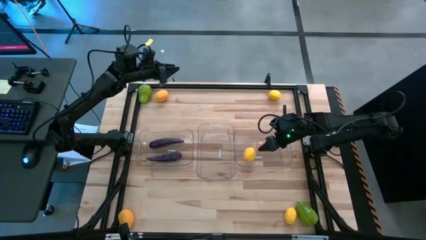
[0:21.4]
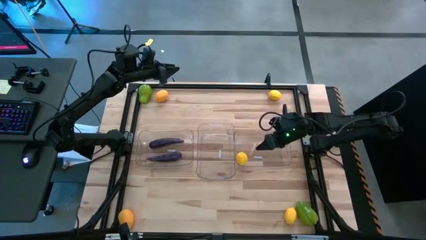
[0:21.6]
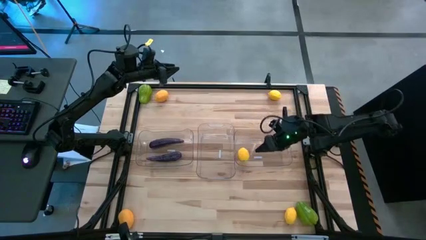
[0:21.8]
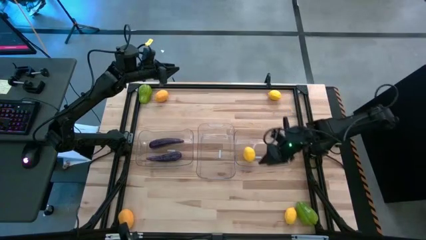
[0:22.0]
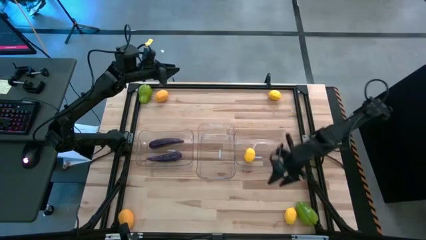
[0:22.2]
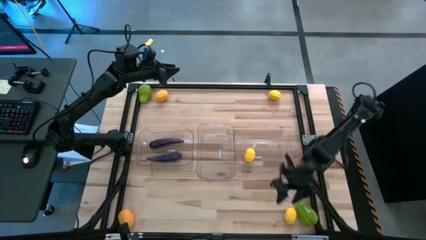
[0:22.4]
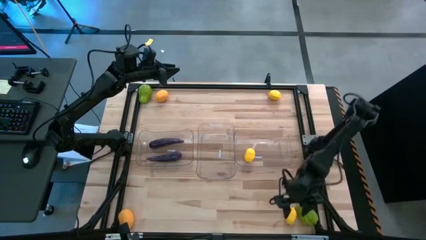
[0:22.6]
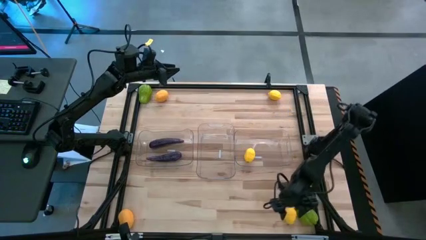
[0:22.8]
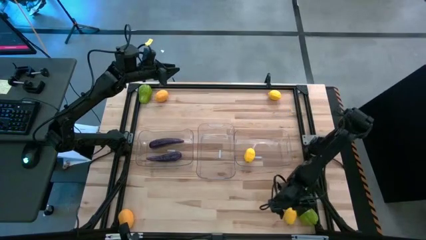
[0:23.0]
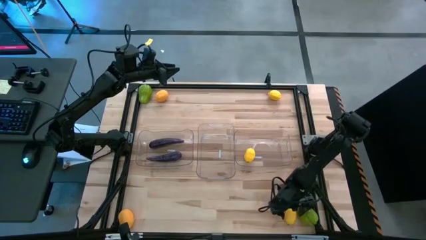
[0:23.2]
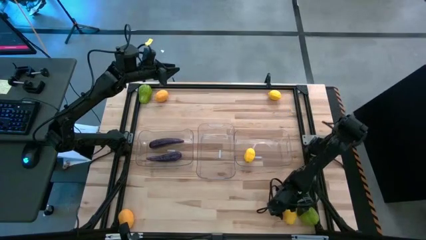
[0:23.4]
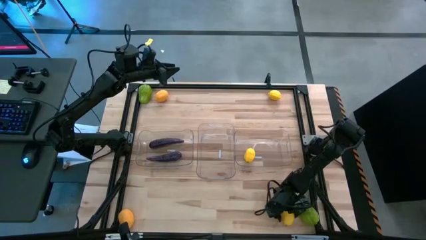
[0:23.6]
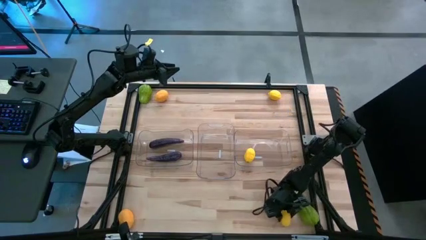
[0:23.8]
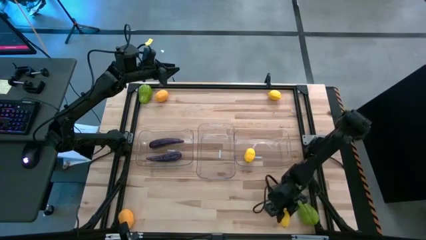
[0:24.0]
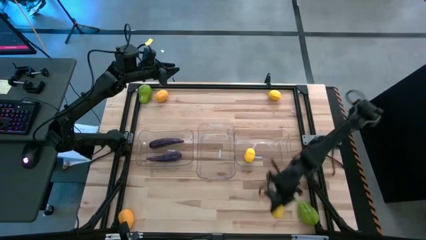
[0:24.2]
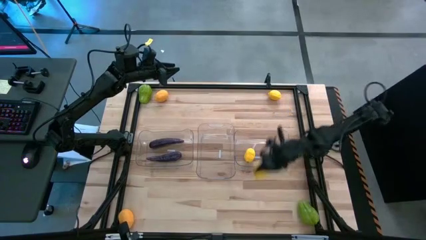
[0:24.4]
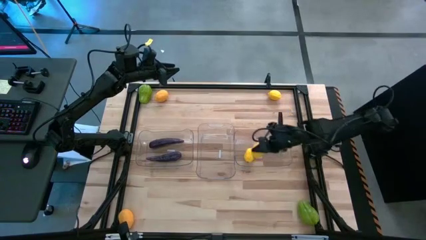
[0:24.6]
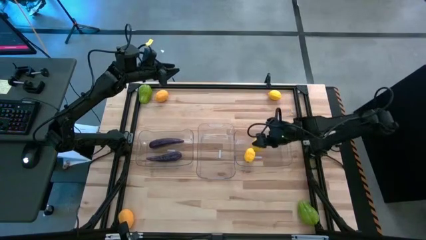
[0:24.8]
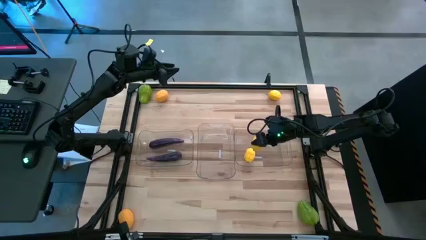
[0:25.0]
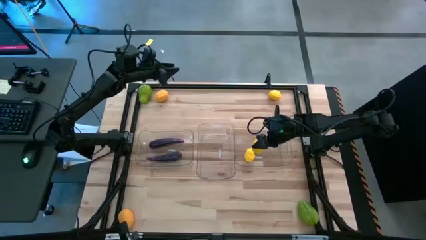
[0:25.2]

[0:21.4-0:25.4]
Task: Sort produce into baskets
Put the lemon into the right transparent bin

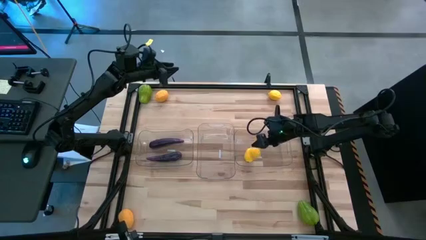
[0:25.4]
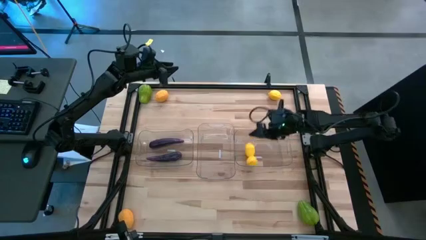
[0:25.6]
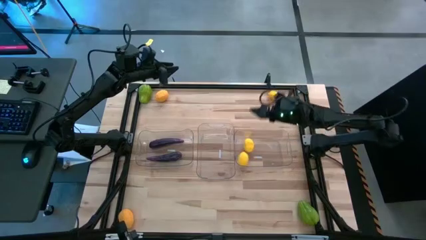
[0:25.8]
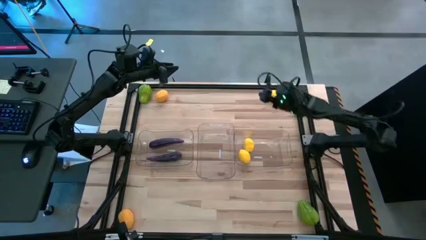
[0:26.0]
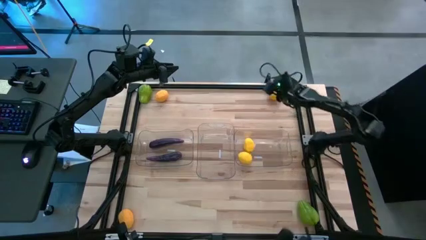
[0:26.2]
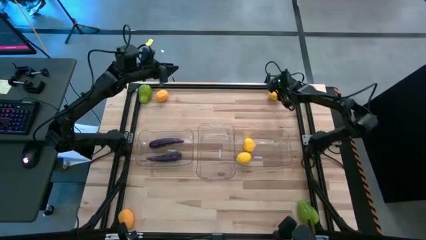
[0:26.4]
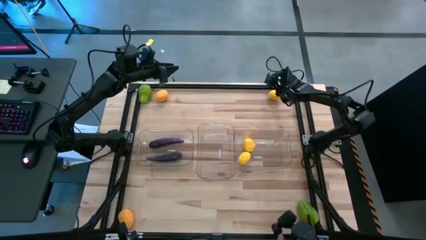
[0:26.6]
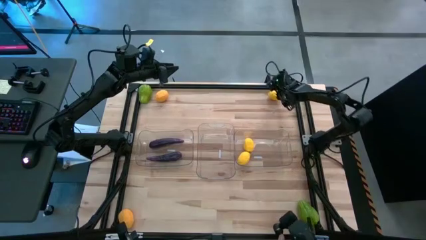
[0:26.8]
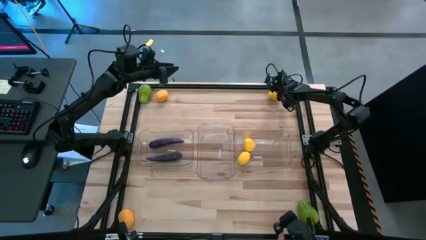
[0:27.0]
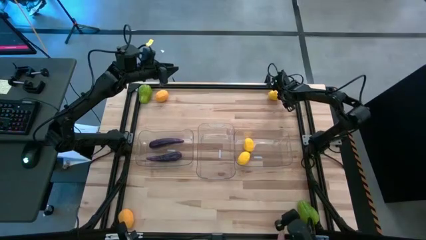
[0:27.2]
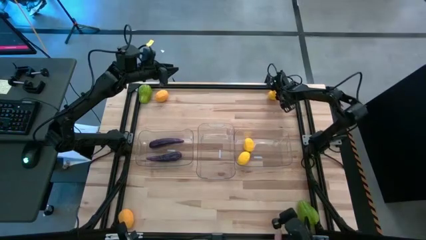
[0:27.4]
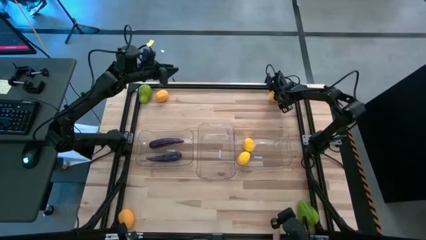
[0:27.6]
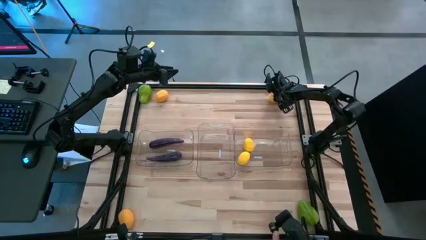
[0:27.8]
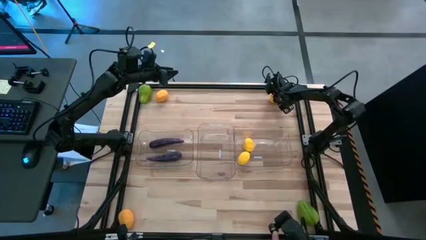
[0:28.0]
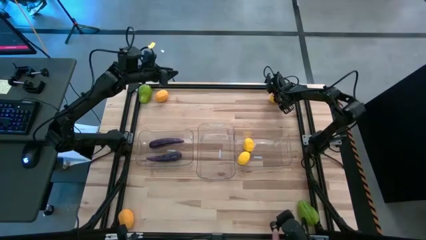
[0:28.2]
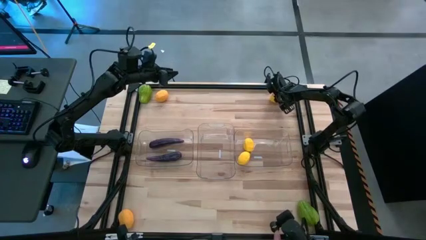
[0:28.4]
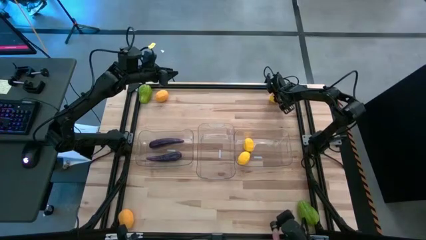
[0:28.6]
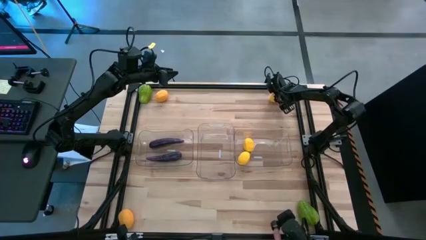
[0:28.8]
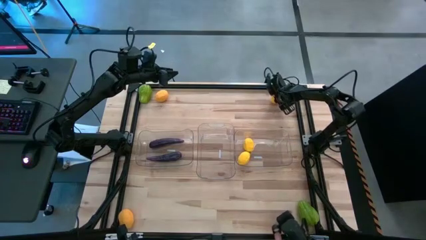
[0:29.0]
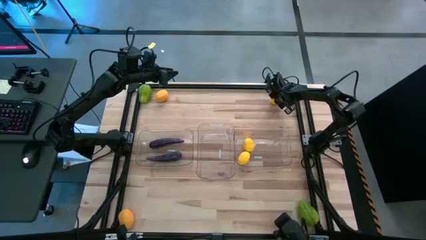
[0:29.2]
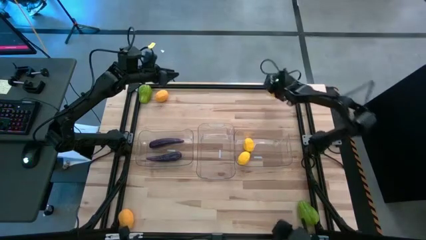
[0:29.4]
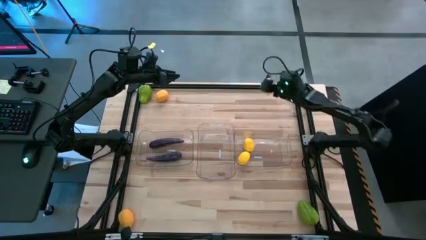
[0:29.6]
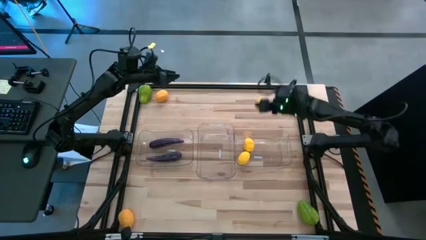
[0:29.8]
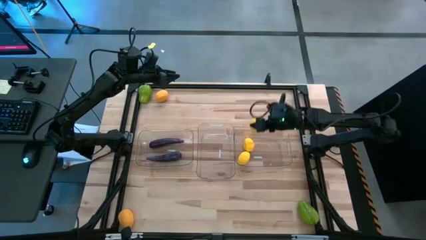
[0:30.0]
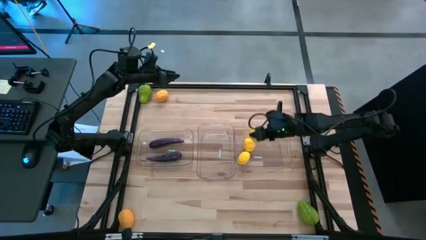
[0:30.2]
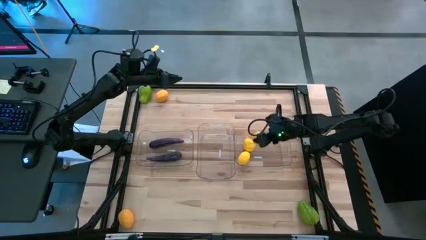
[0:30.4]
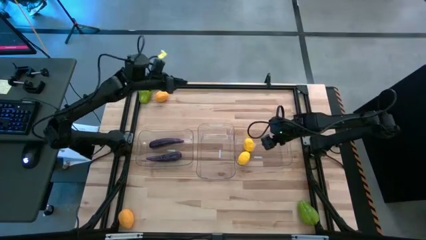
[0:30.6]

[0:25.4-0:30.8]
Put the lemon into the right transparent bin

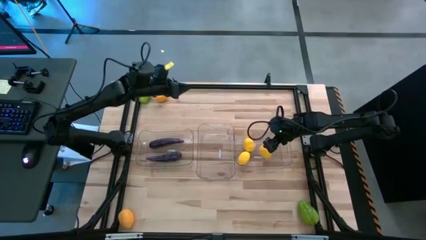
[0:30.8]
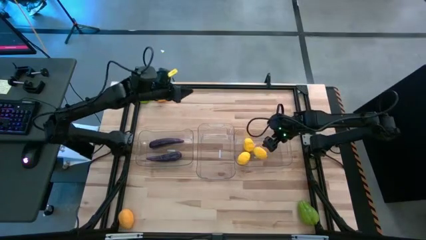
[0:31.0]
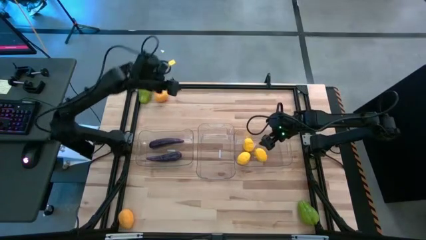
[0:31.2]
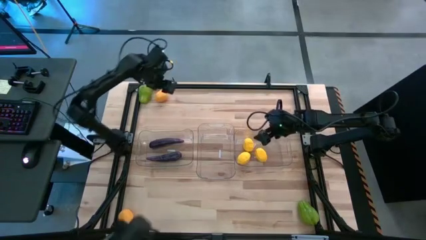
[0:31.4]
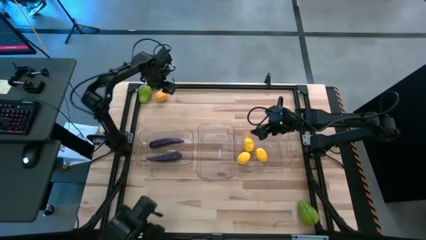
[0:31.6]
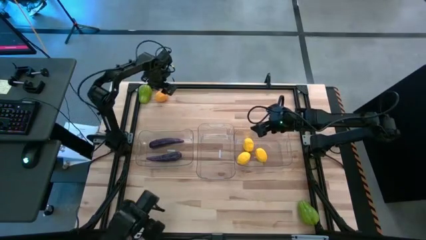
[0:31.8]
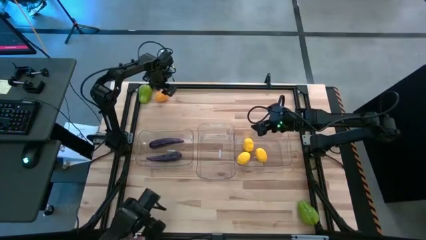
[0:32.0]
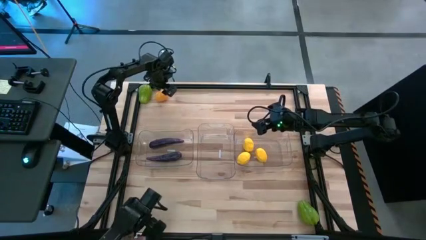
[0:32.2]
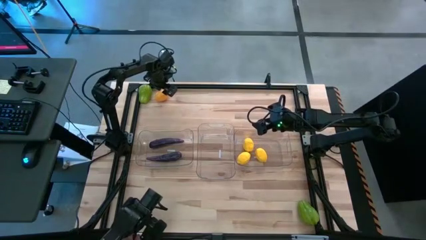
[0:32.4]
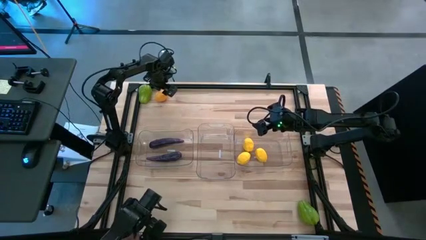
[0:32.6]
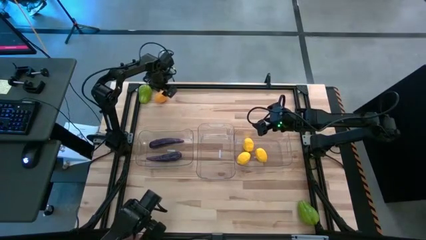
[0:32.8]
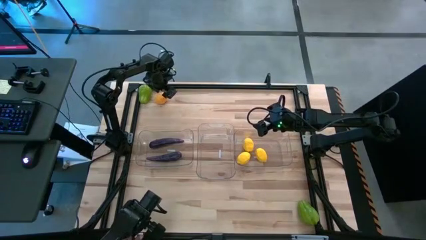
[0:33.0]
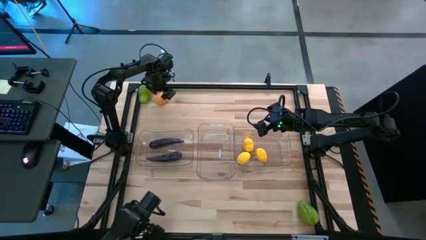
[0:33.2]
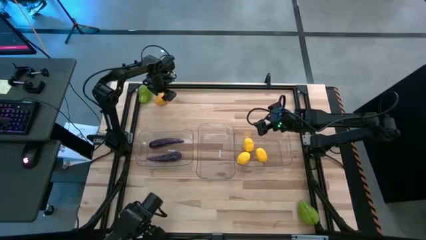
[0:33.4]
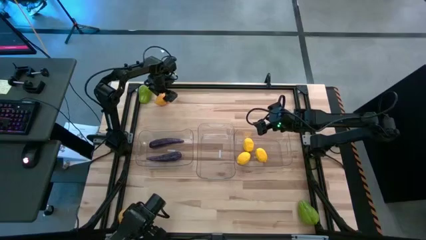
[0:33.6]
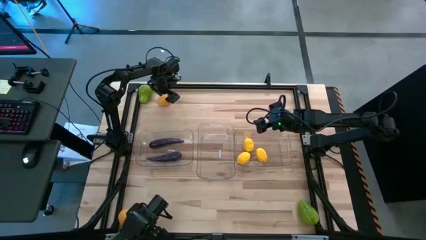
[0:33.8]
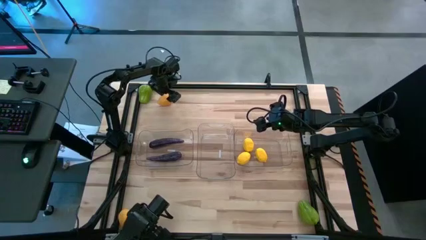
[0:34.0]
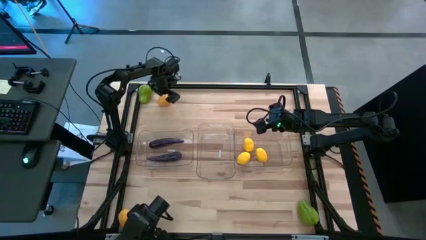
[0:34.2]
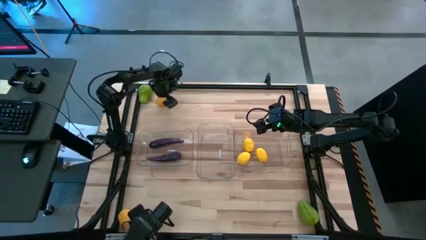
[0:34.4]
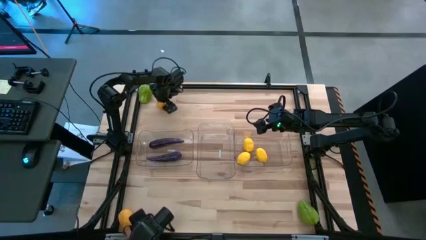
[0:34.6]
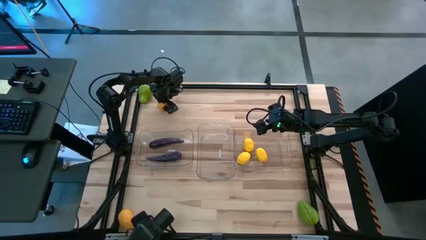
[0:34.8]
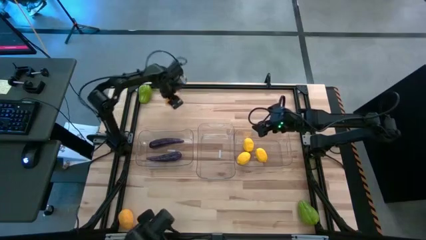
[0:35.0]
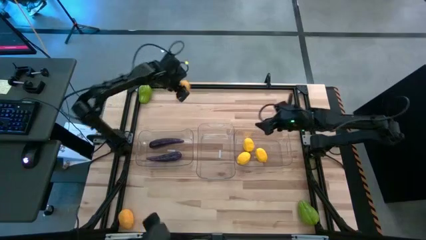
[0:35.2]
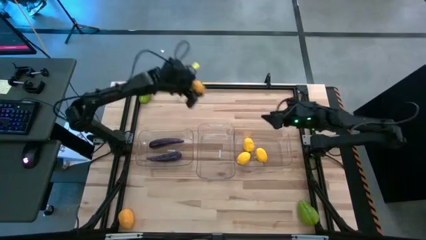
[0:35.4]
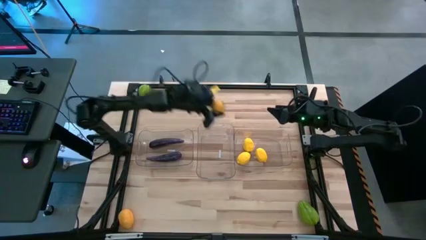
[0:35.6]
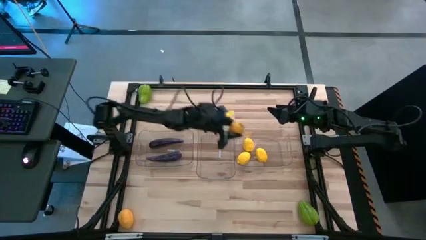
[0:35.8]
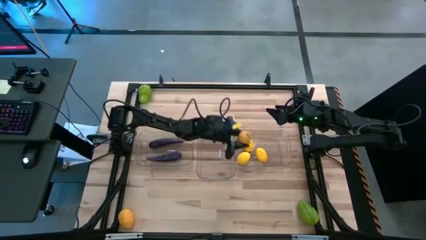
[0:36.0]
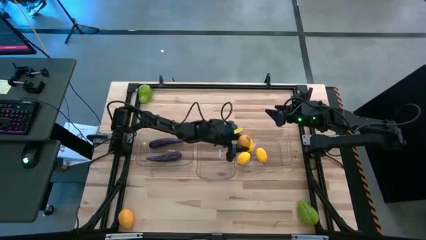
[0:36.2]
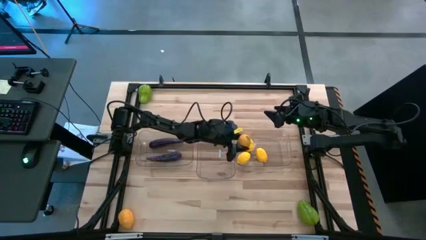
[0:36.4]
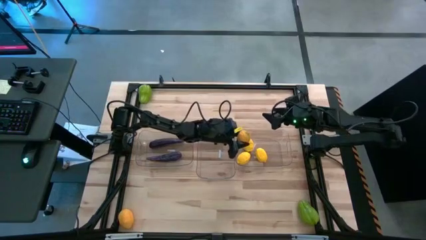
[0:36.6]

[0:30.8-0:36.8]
Put the lemon into the right transparent bin

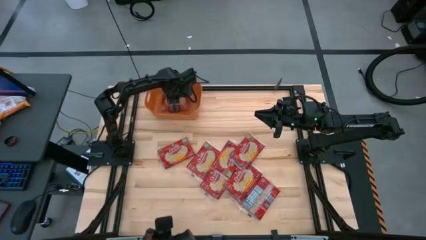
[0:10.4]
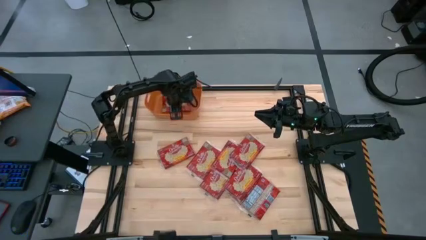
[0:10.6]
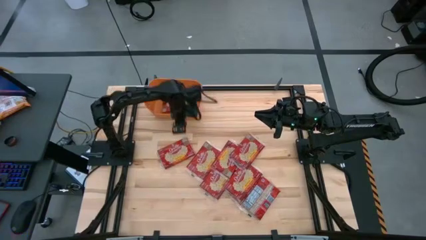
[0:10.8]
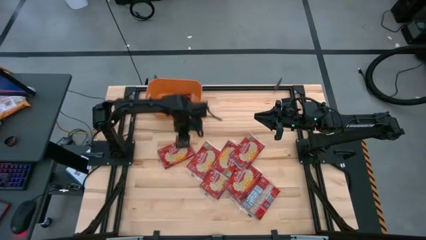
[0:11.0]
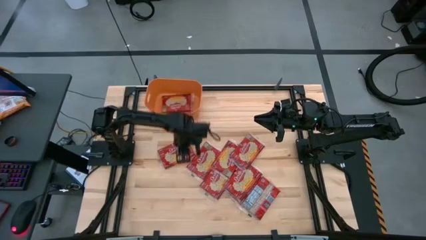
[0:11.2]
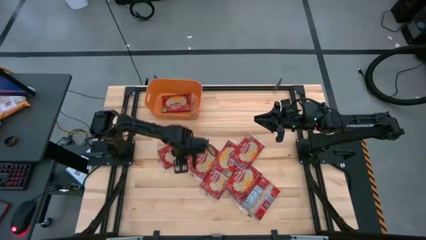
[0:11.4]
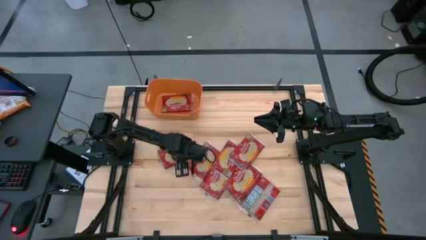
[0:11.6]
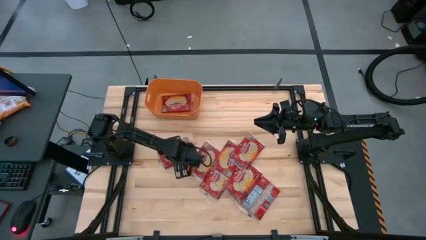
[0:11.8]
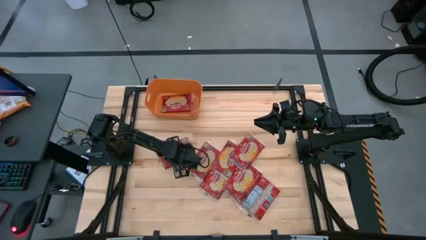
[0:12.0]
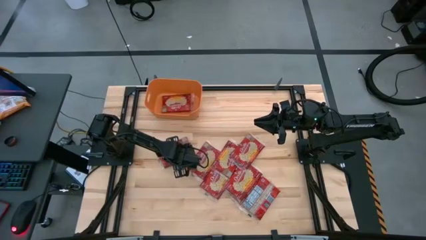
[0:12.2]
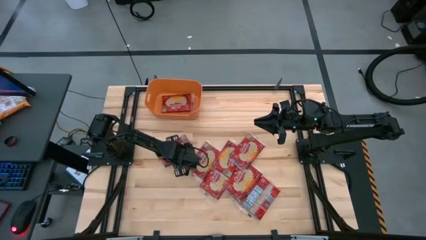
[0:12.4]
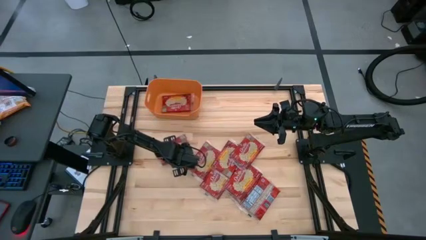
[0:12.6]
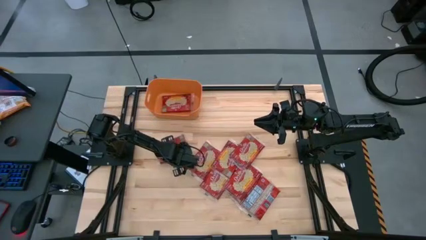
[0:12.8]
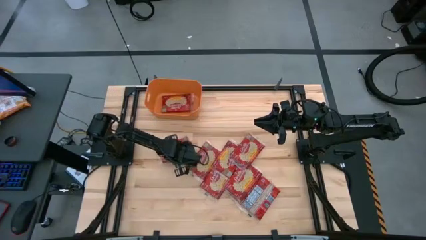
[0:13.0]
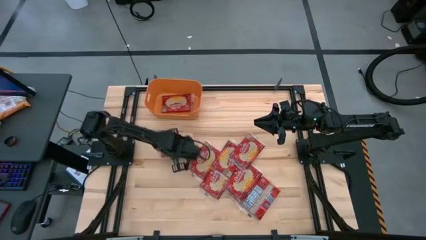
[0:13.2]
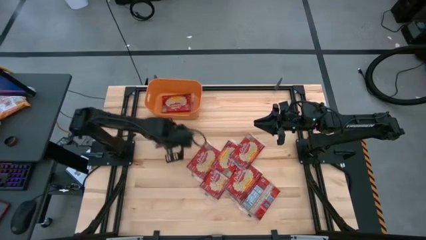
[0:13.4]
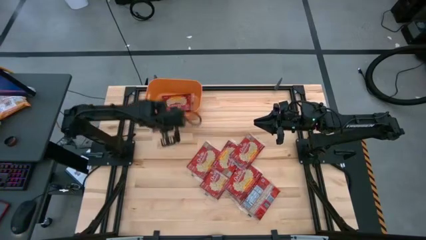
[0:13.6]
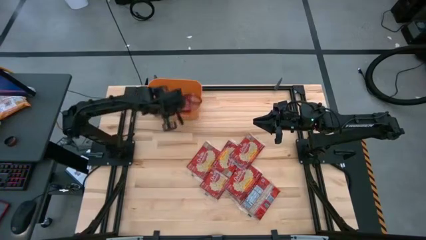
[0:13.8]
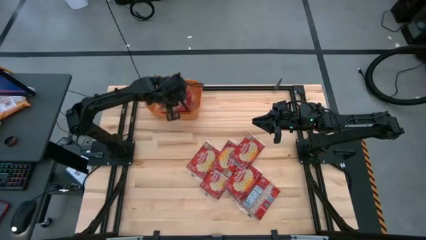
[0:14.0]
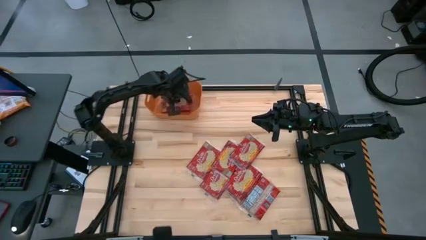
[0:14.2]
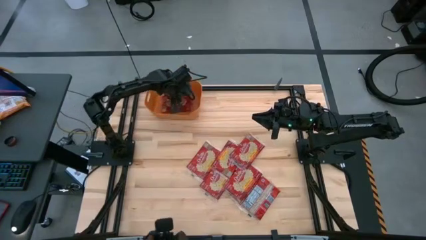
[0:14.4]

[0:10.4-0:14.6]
Task: Sort popcorn bags into baskets
Put the red popcorn bag into the orange bin
